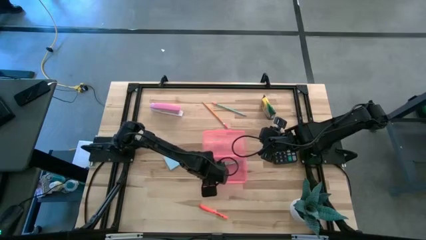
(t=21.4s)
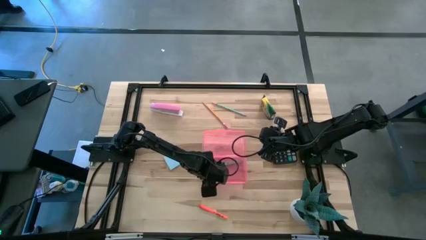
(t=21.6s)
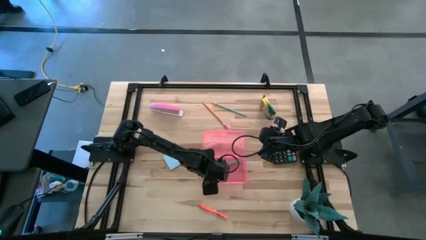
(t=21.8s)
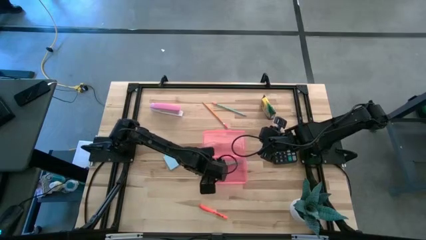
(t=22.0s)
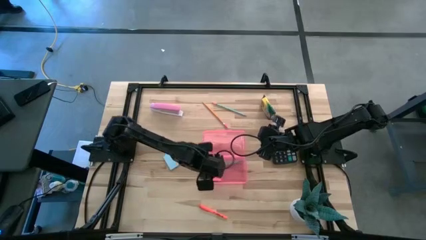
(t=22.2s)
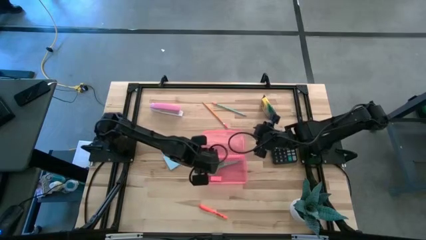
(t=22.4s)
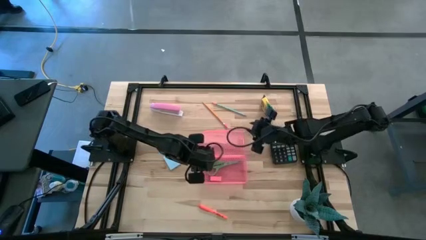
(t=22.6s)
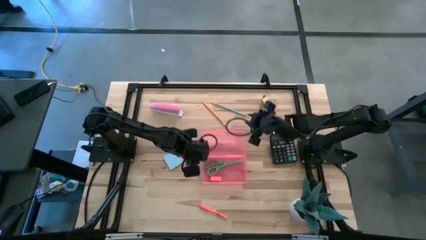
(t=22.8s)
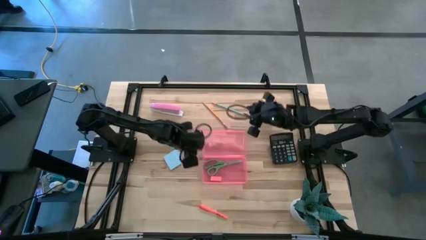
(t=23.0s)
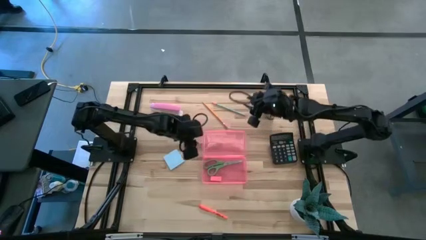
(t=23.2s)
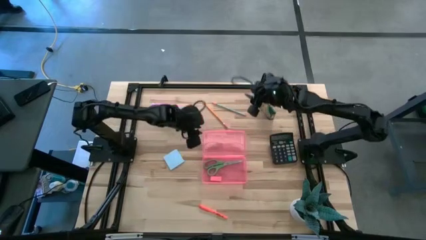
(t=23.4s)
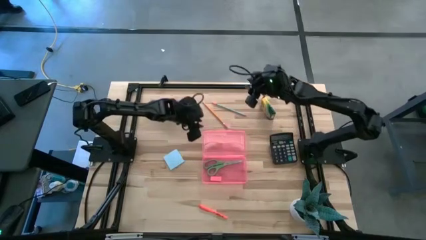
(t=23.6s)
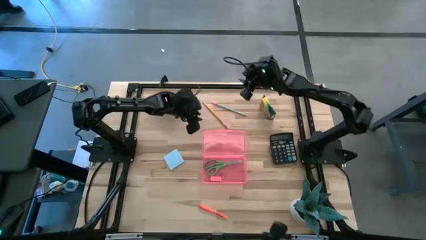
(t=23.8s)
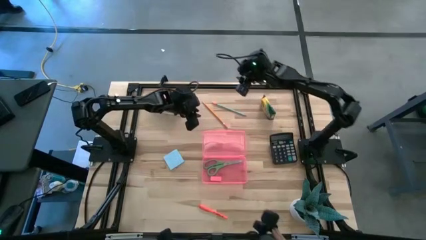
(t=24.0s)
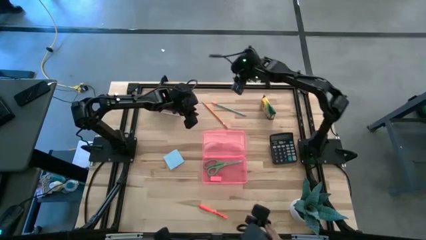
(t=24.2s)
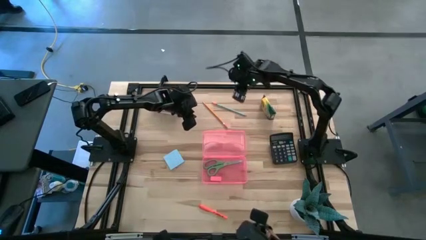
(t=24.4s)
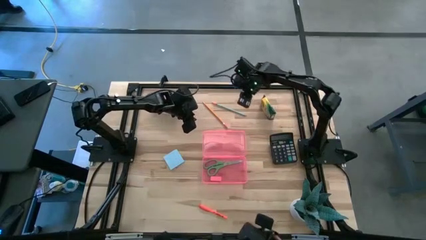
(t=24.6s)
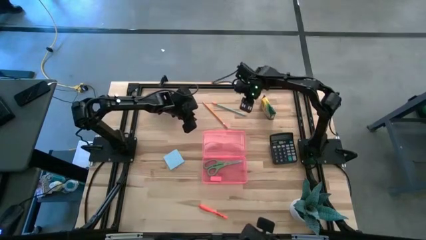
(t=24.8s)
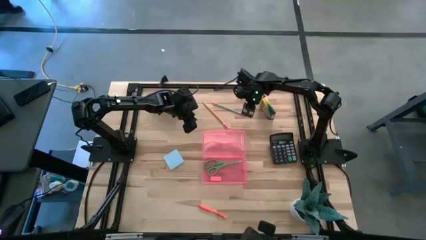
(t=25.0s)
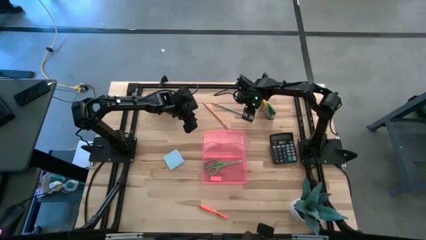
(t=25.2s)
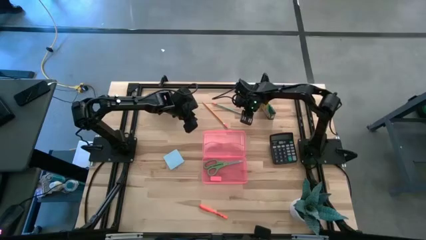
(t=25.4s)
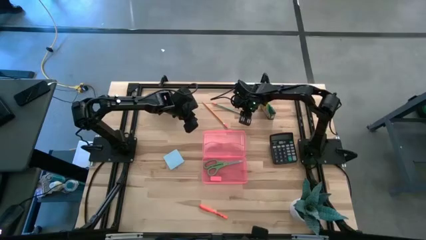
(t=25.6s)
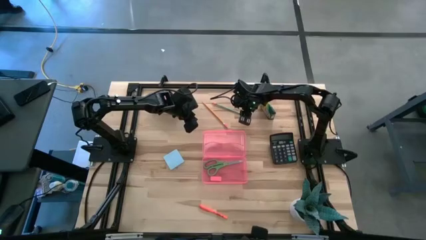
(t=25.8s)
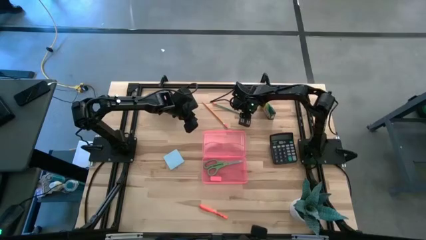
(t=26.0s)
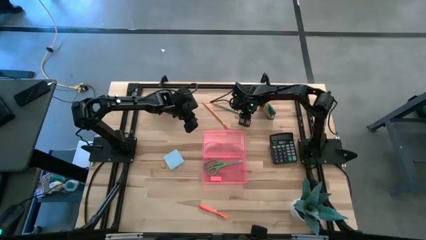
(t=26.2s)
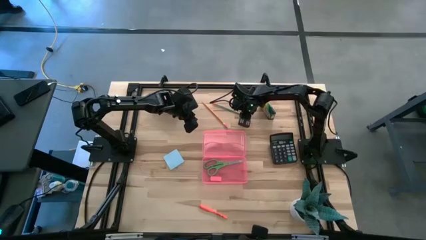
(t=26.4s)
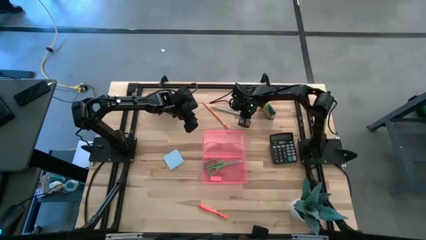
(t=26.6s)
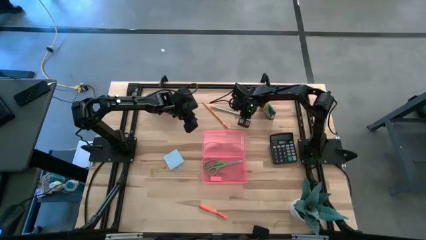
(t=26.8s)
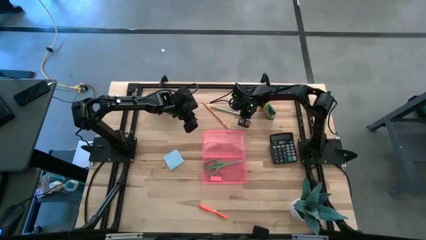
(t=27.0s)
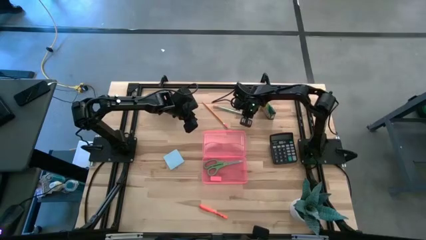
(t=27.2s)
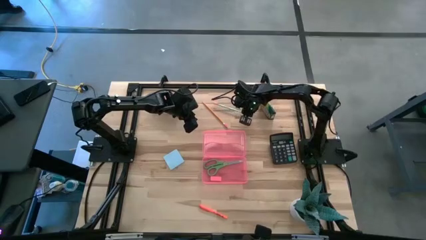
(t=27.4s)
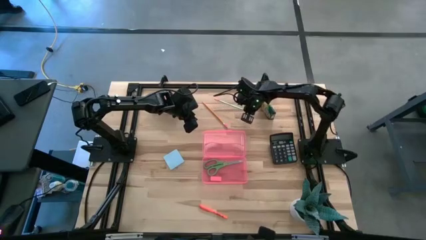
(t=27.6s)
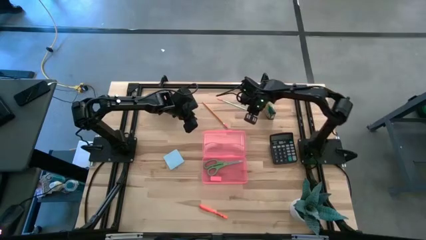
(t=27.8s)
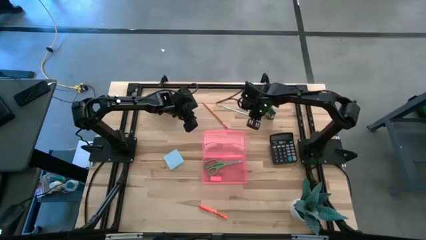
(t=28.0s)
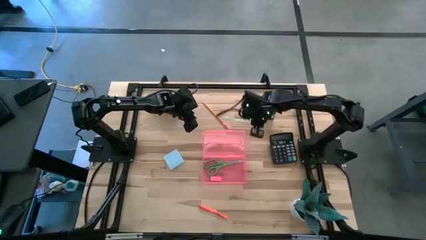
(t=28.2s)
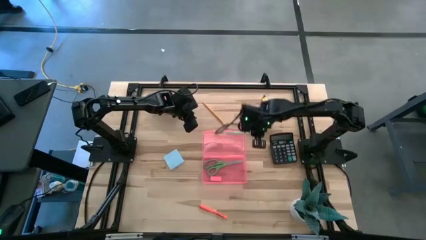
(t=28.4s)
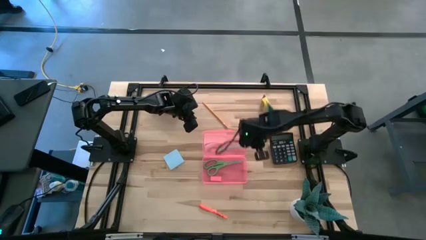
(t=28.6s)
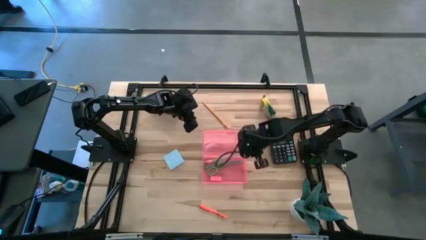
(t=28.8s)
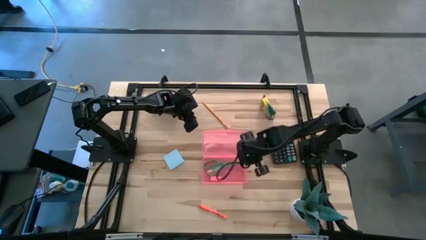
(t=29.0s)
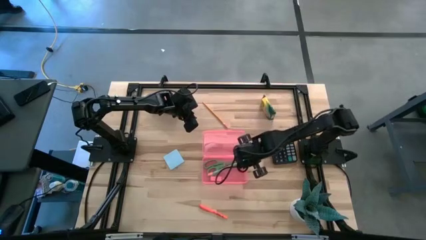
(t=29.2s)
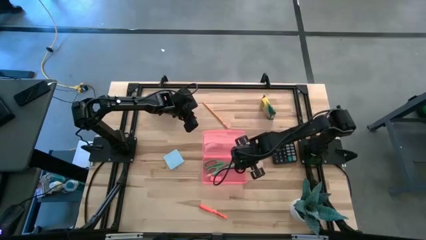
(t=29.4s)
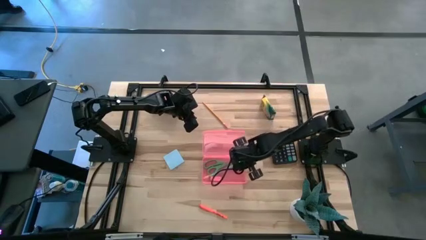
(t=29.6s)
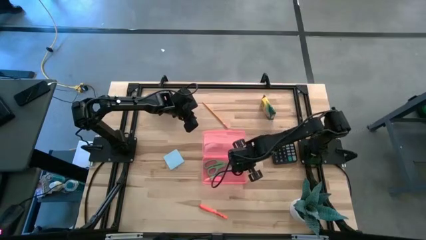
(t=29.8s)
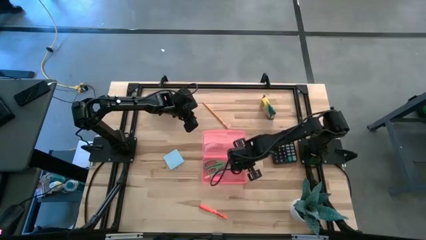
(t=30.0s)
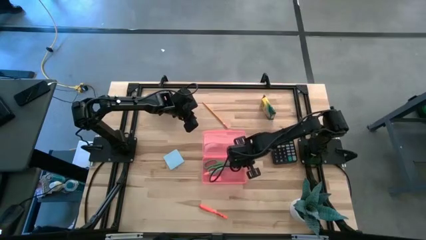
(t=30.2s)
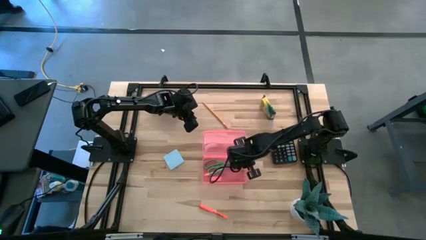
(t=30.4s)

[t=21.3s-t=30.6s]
Task: Pack school essentials
Put the blue pencil into the supply box

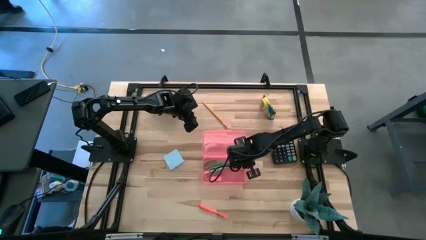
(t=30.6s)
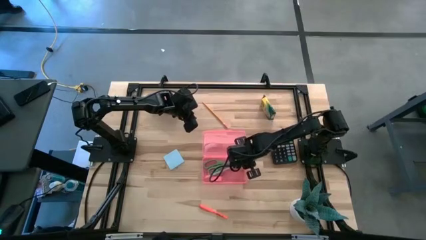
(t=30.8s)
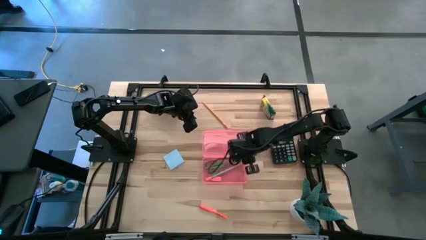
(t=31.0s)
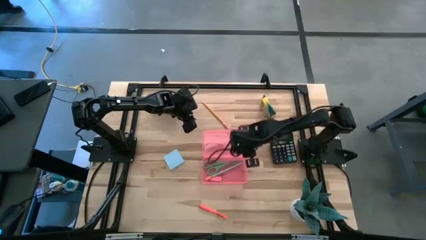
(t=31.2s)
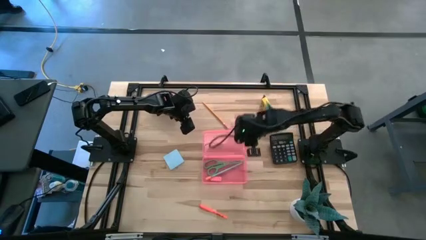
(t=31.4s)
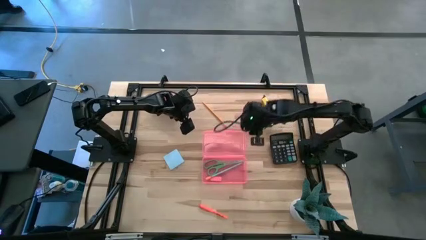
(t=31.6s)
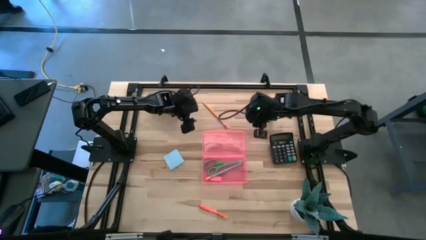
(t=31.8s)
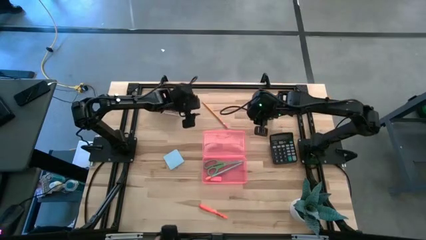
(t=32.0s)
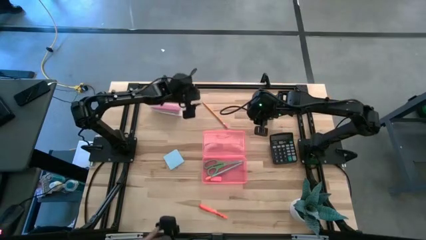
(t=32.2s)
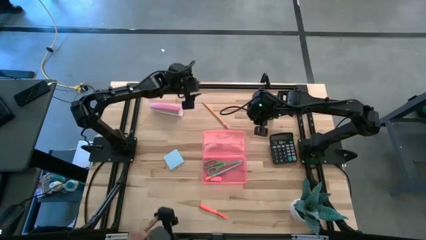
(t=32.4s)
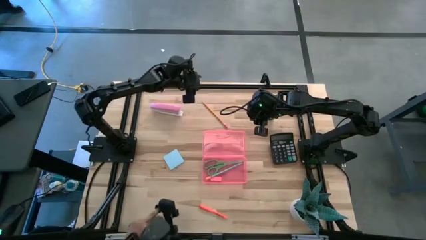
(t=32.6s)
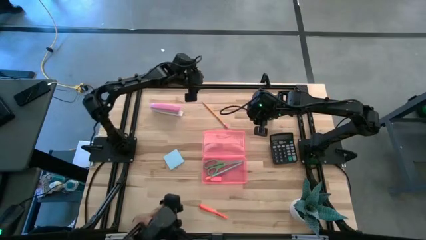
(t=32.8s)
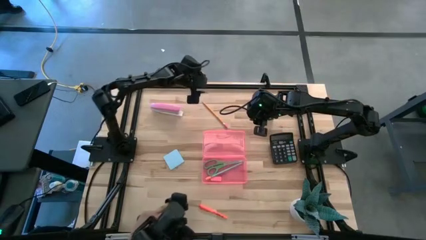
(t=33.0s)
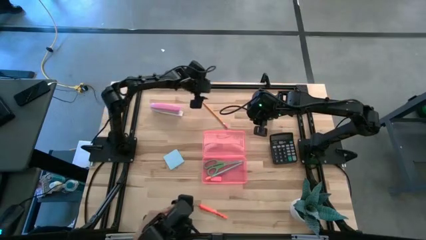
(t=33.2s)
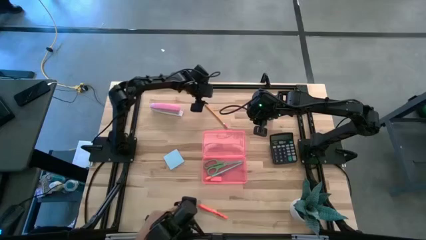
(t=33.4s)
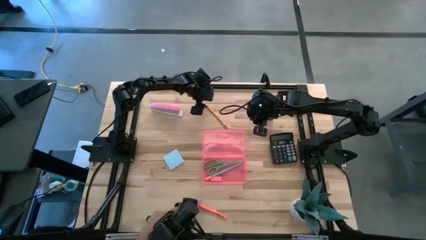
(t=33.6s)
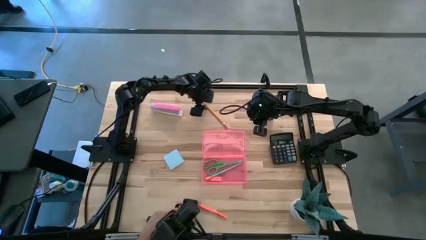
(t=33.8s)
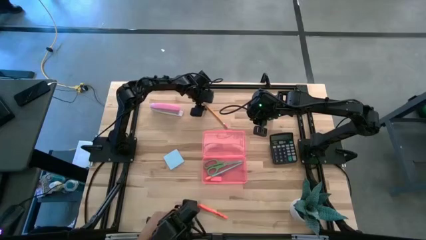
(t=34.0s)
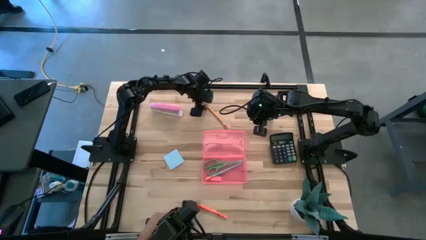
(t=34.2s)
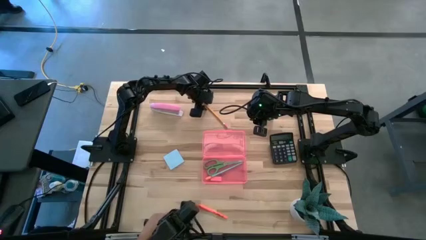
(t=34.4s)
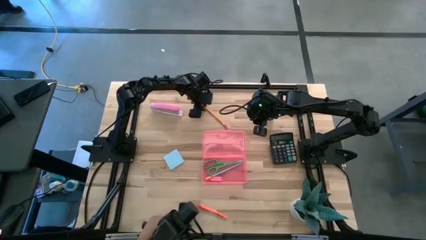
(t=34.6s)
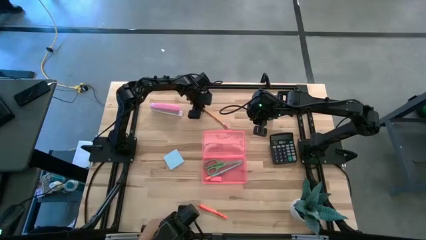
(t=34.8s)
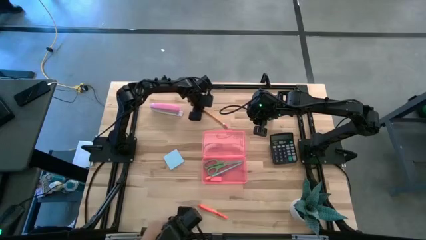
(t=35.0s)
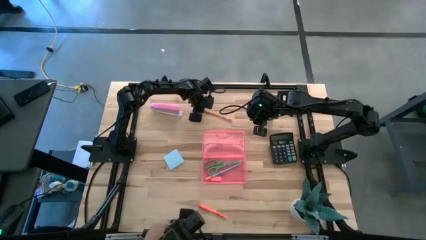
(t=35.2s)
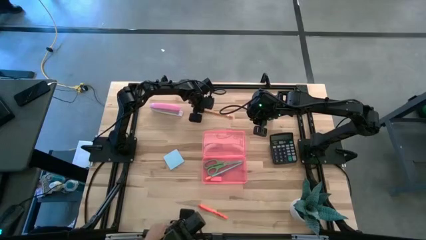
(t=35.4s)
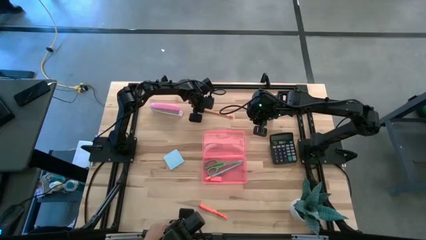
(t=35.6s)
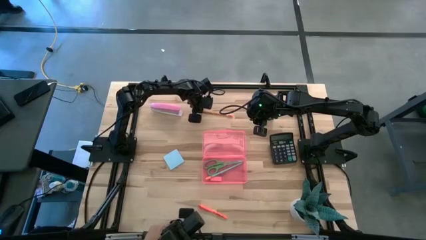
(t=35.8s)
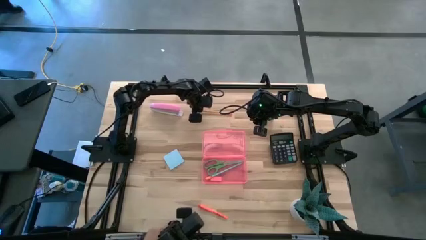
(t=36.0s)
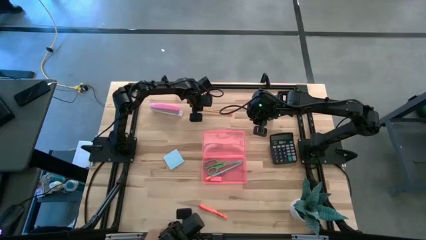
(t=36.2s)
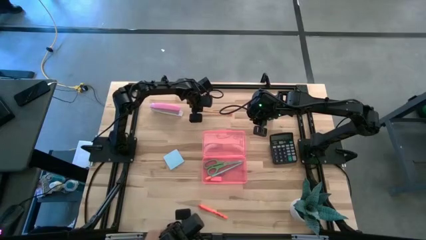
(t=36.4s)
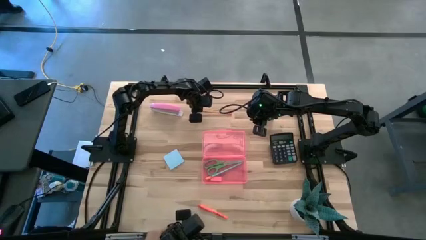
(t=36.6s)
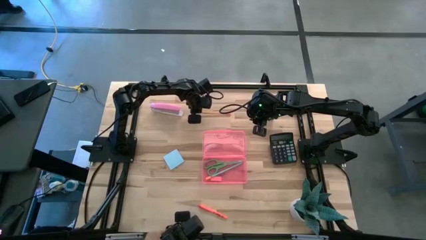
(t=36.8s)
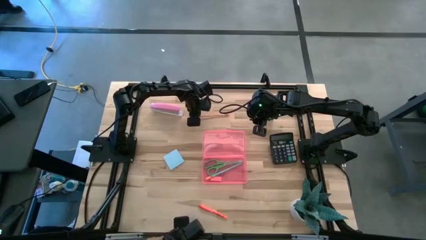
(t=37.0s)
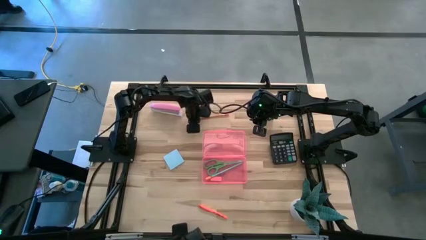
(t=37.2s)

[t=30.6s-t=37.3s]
Put the orange pencil into the supply box

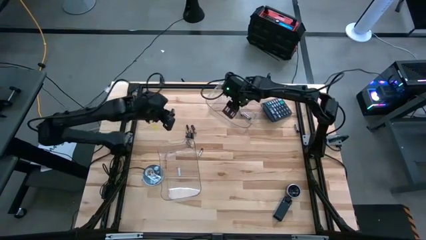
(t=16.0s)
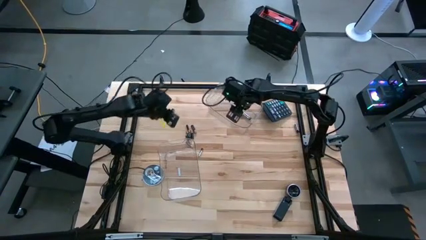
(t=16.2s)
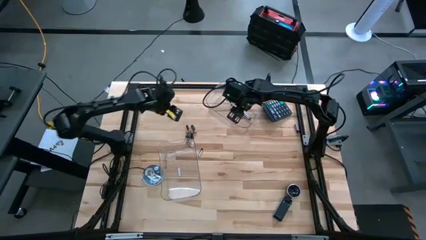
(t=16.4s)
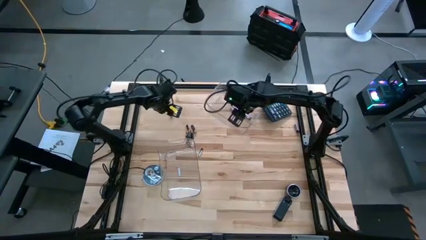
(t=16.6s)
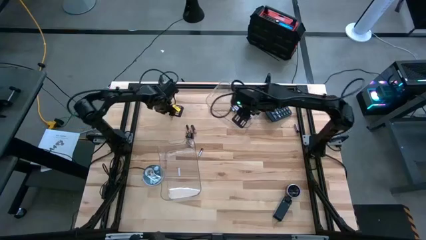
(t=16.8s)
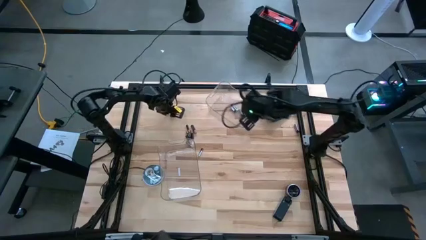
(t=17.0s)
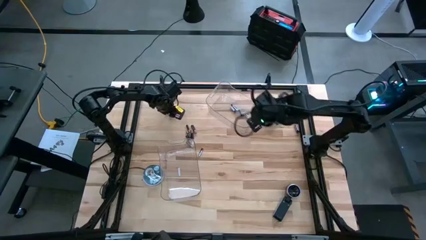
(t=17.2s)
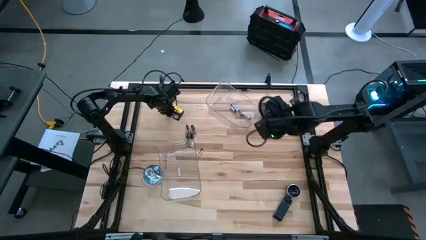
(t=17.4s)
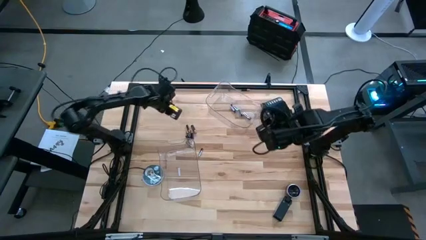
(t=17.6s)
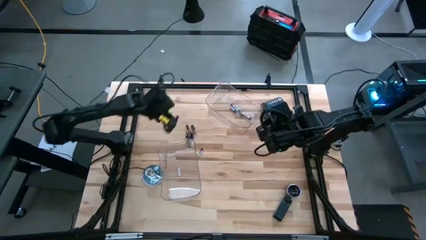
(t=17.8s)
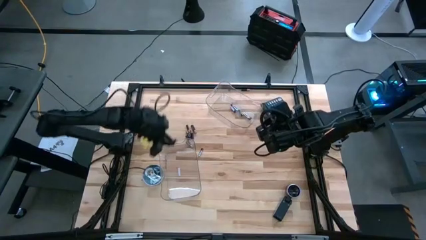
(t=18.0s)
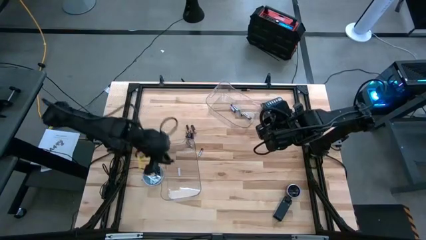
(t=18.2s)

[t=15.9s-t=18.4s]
Task: Sort batteries
Put the black battery into the bottom transparent bin
